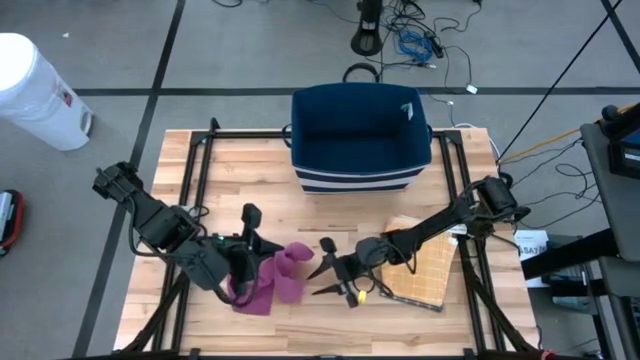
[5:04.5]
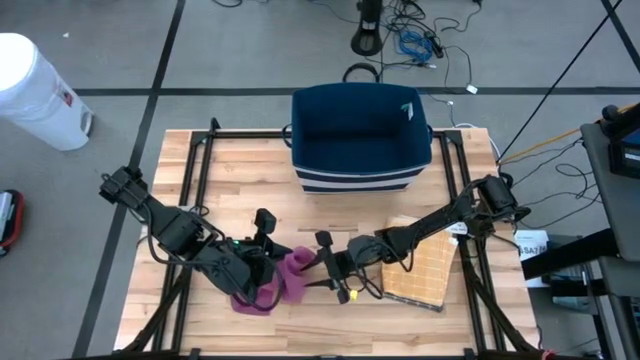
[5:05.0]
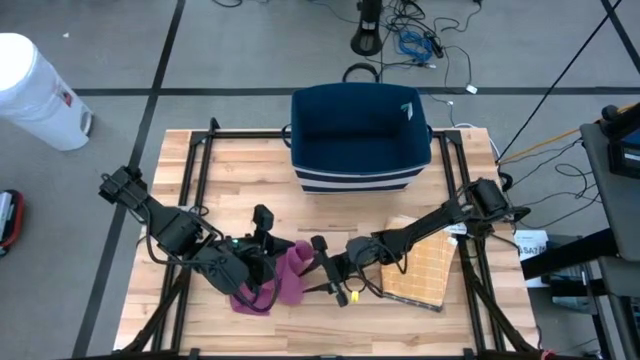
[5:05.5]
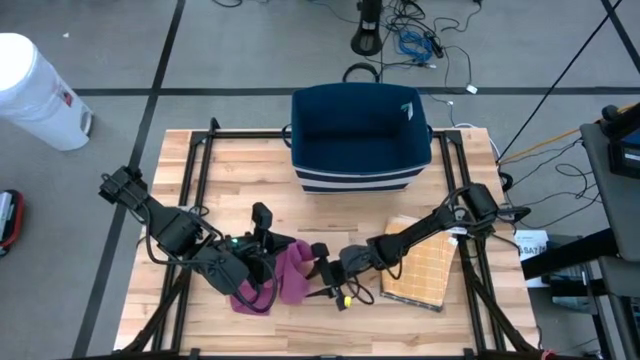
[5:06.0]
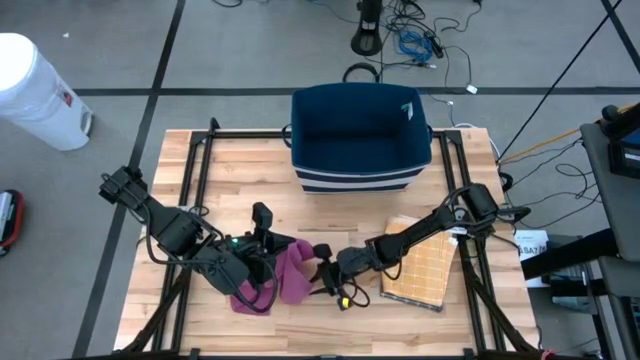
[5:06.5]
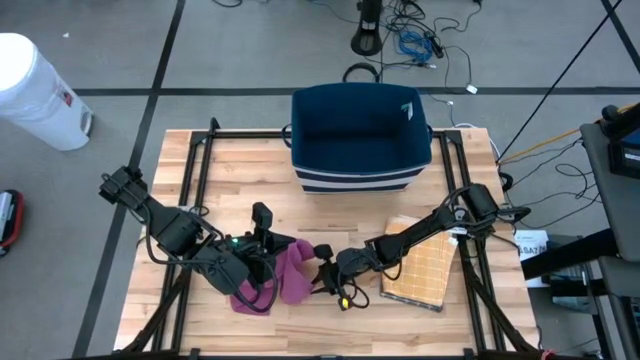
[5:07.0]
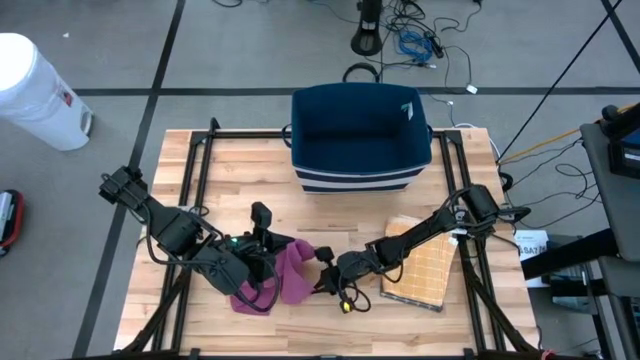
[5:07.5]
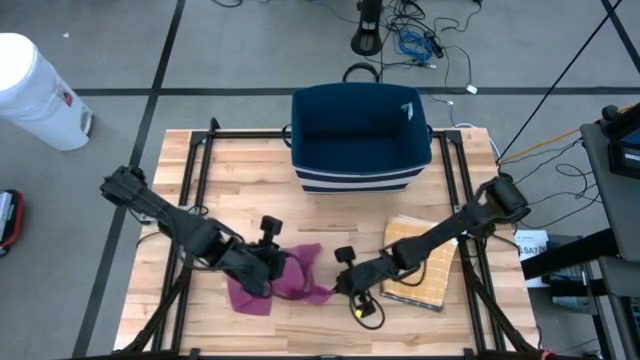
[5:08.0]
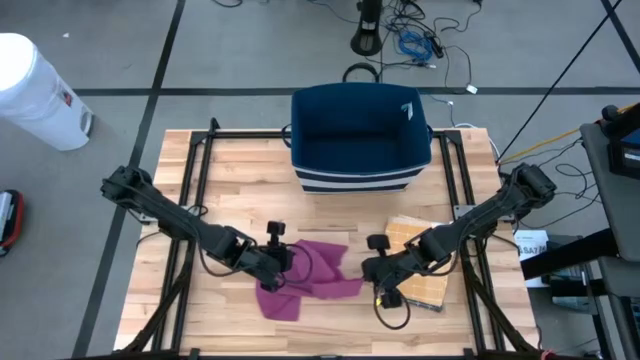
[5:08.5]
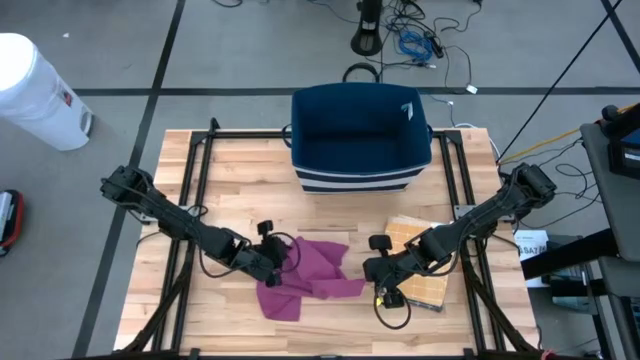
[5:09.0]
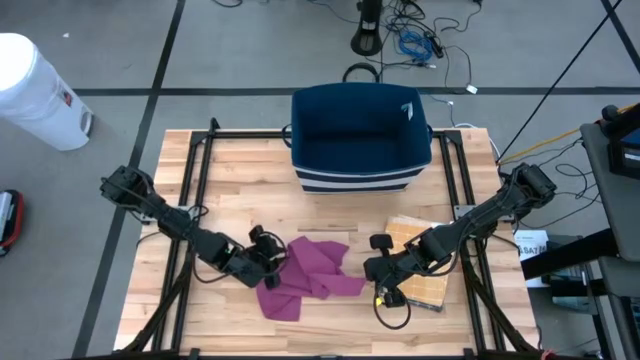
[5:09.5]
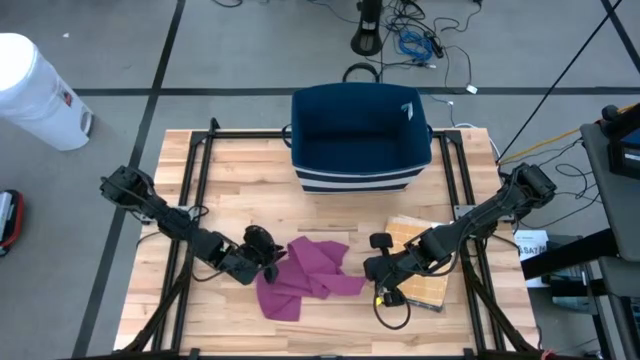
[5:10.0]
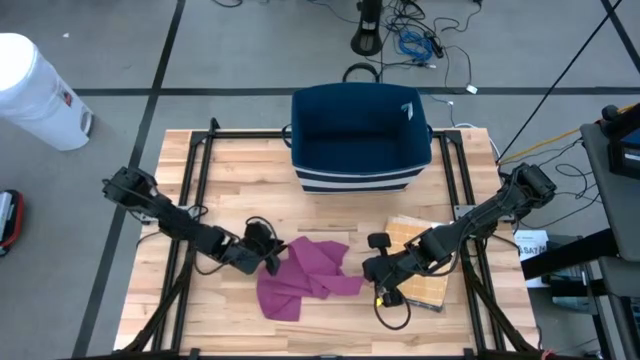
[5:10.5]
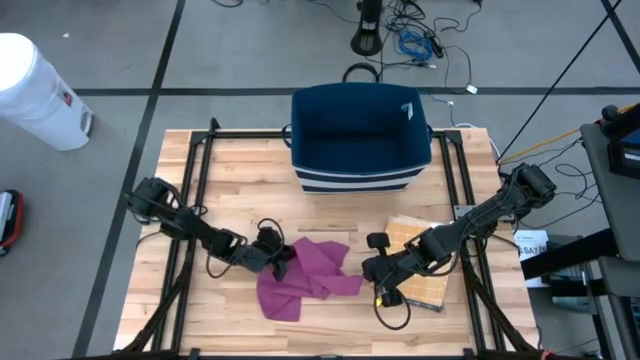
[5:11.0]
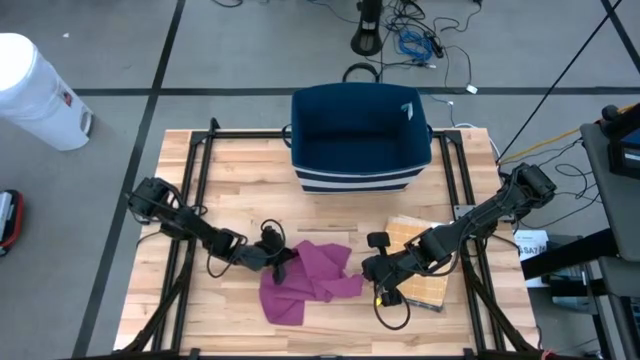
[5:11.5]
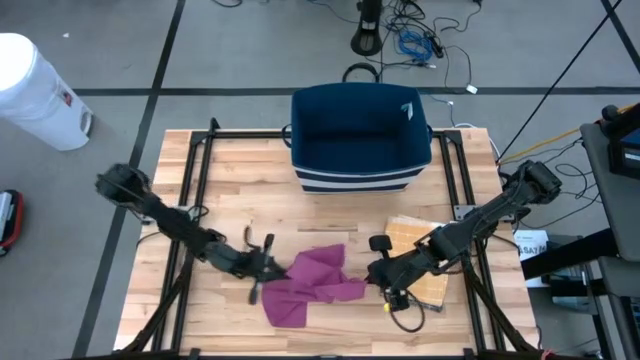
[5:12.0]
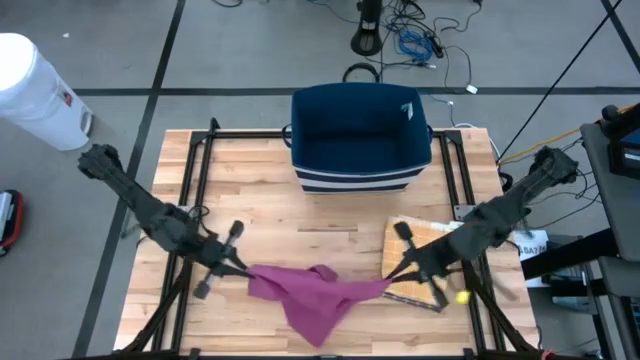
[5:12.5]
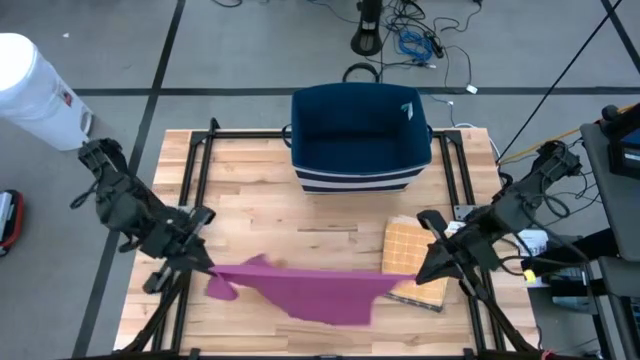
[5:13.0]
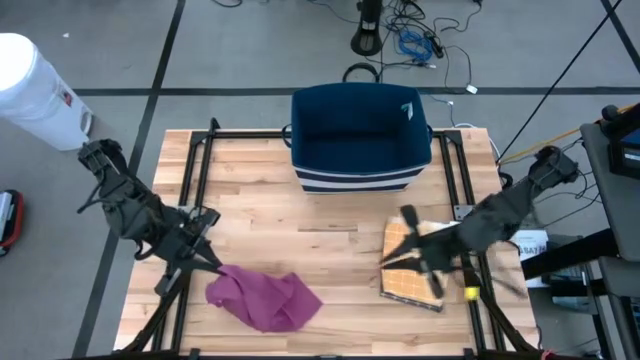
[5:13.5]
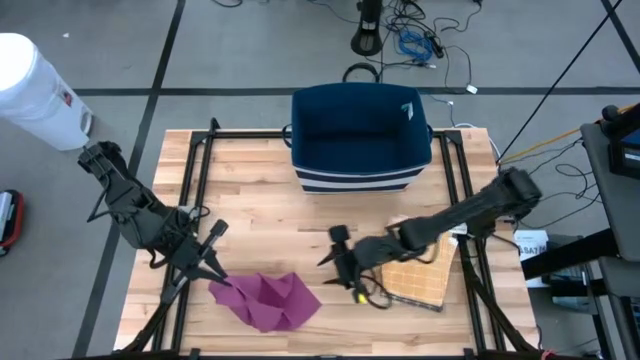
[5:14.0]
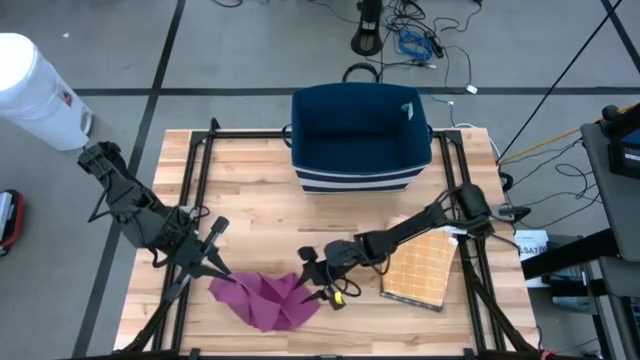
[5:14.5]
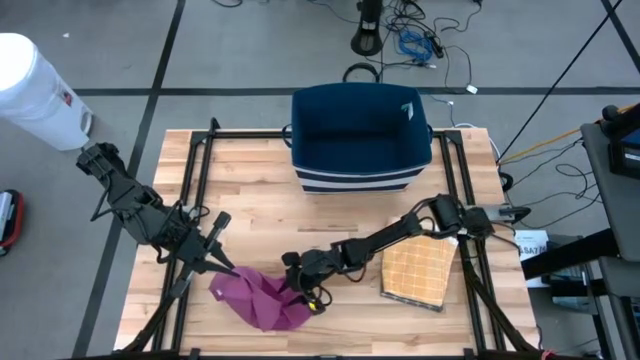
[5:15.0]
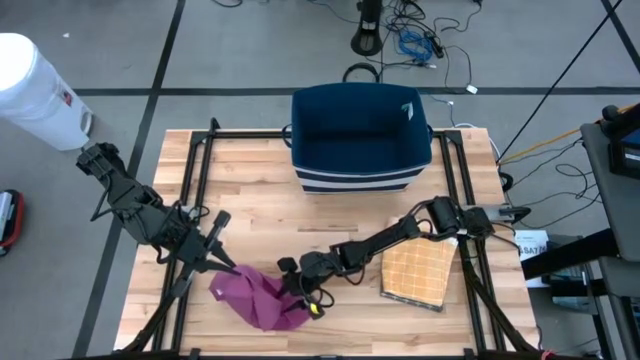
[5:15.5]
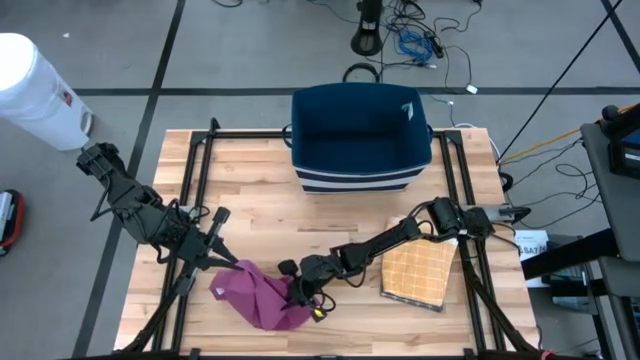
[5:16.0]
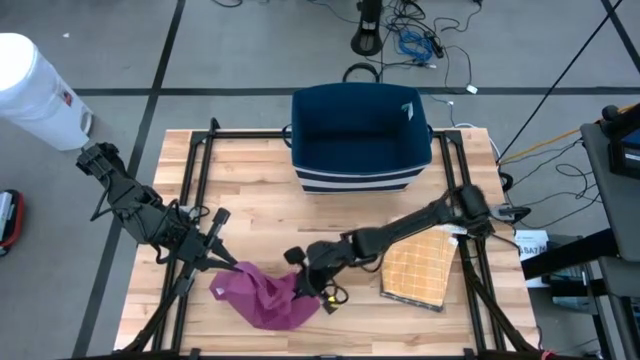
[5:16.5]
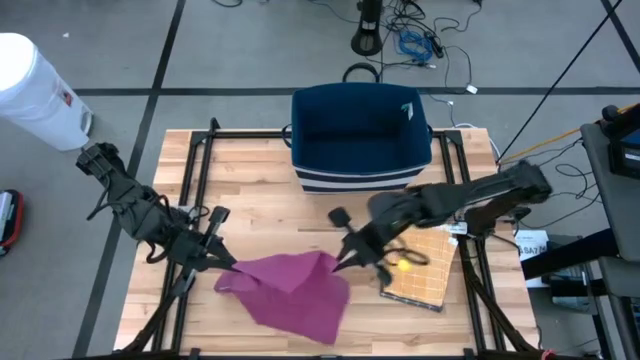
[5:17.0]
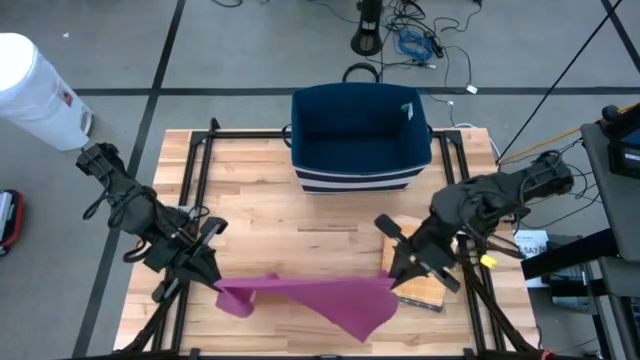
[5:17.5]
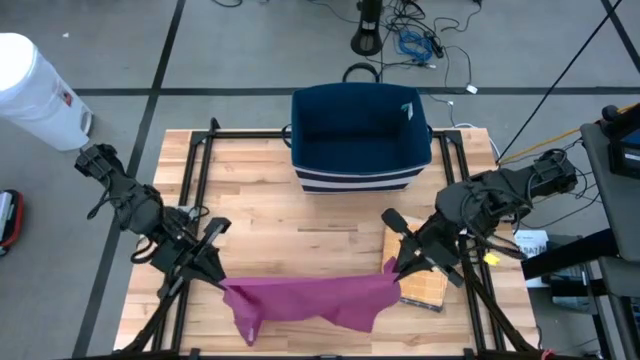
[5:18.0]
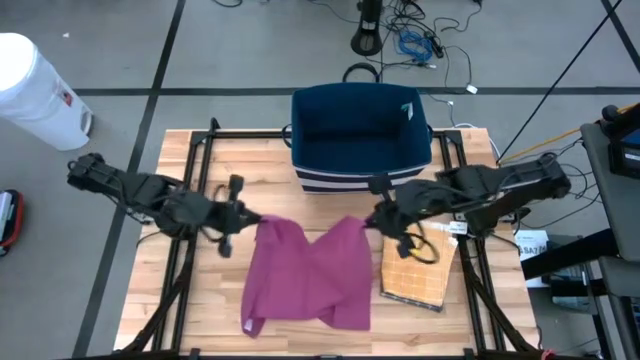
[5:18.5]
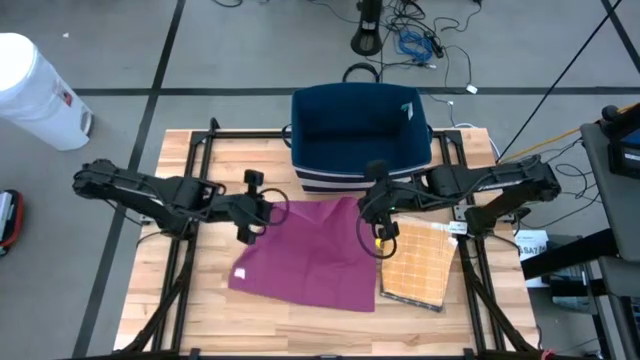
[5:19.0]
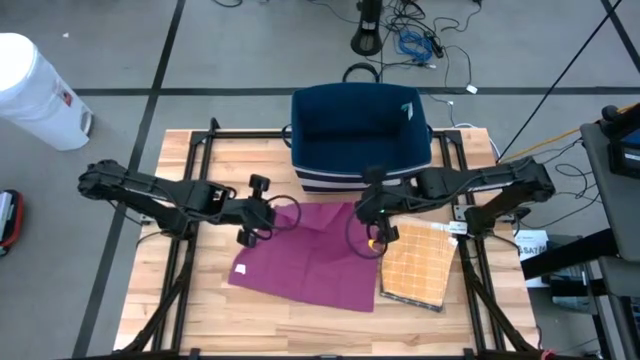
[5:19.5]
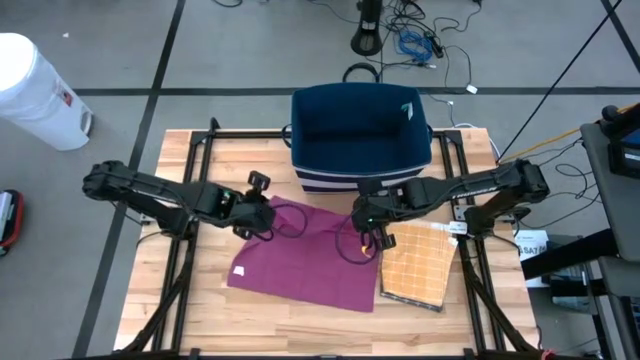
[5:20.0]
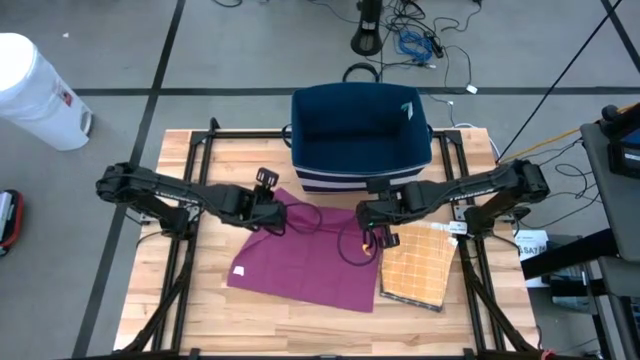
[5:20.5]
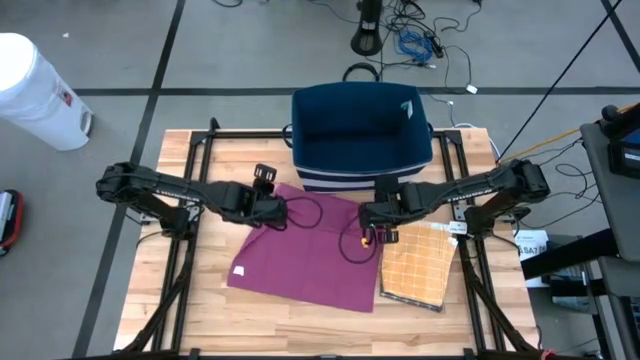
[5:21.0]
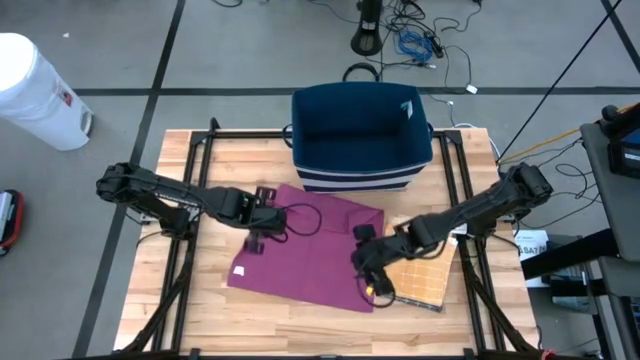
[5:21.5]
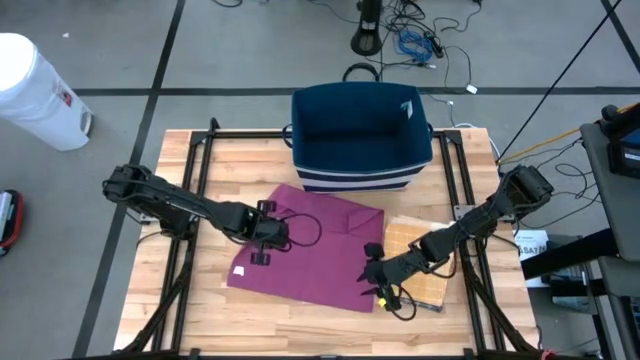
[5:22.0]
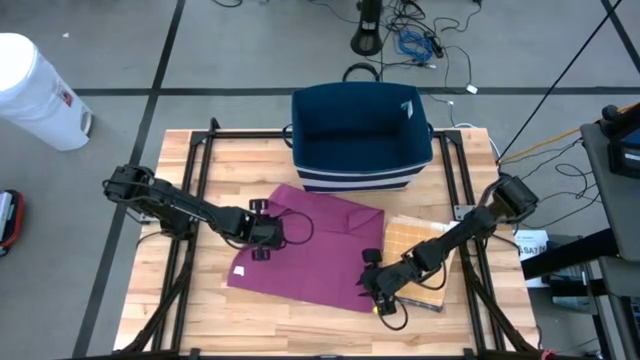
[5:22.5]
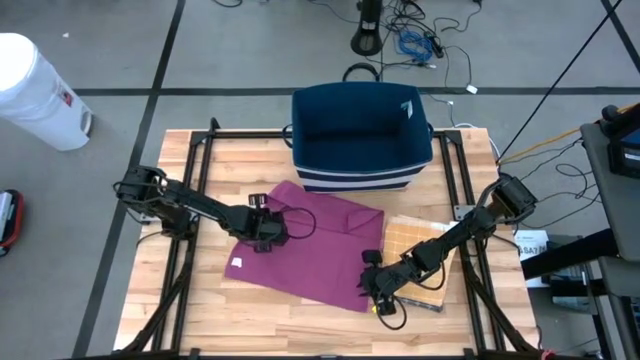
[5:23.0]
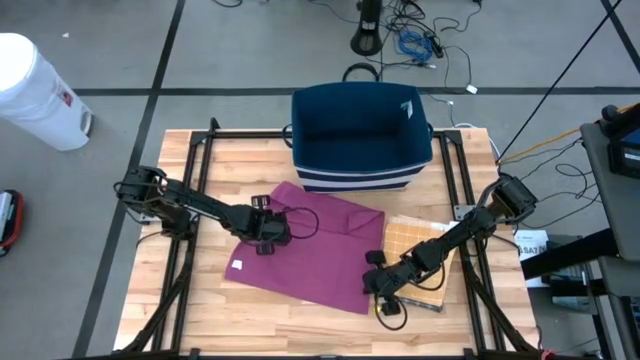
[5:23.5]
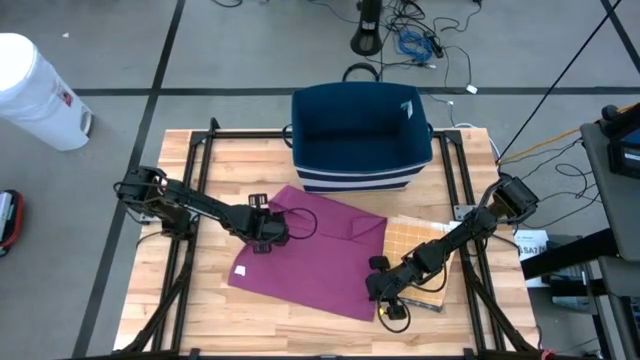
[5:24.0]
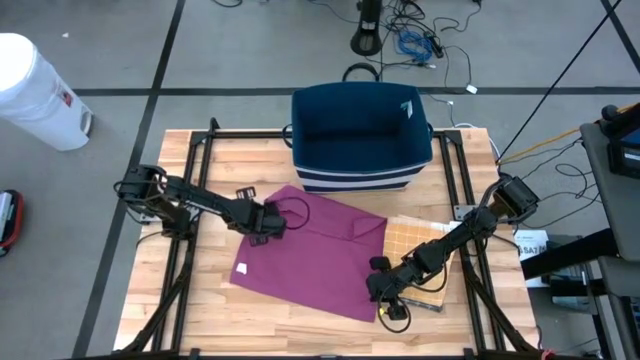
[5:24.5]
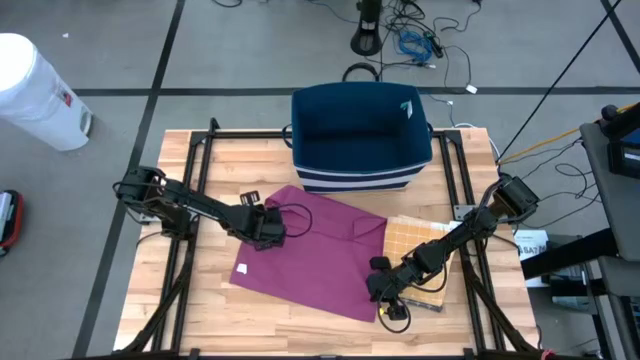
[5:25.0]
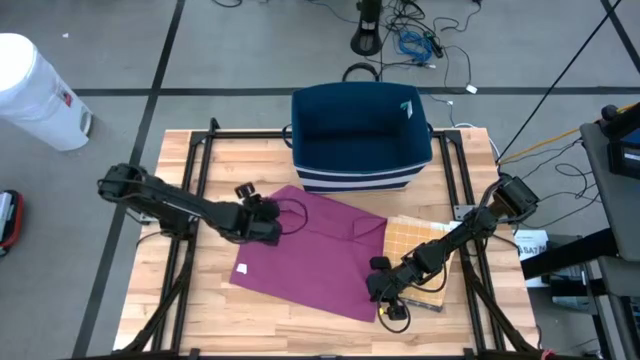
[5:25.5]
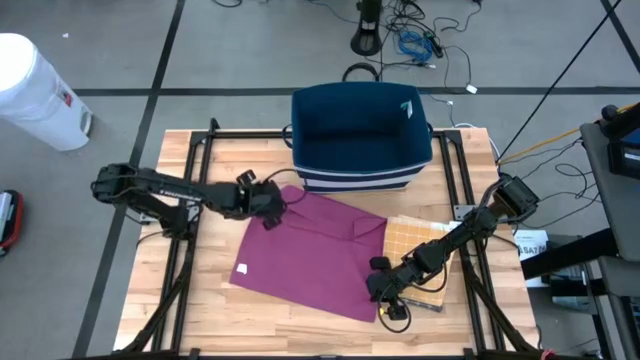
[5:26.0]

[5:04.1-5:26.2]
Task: Fold towel
Fold the purple towel
